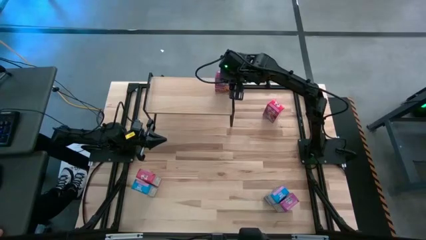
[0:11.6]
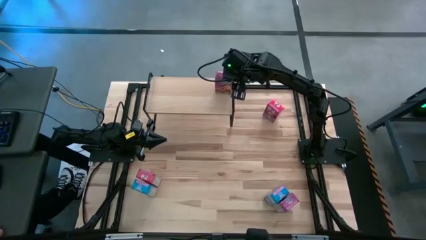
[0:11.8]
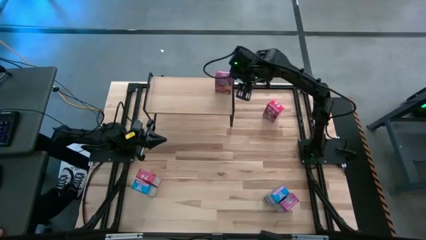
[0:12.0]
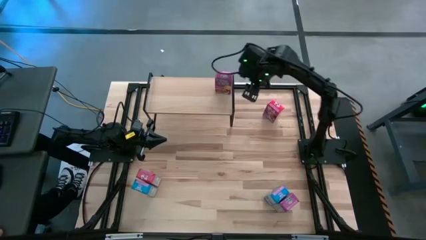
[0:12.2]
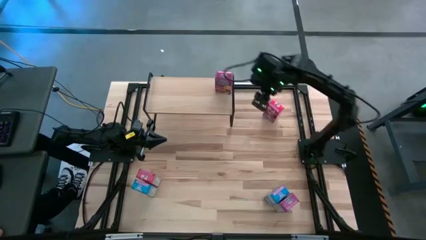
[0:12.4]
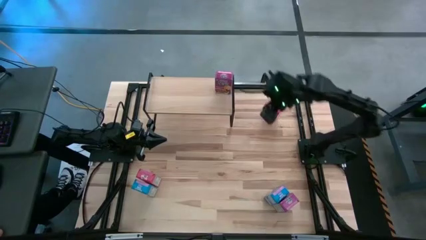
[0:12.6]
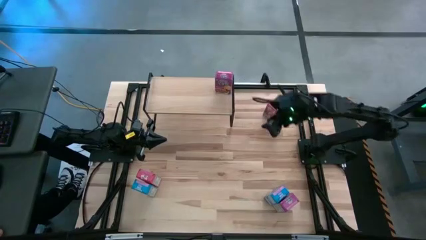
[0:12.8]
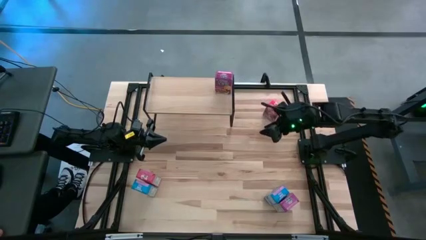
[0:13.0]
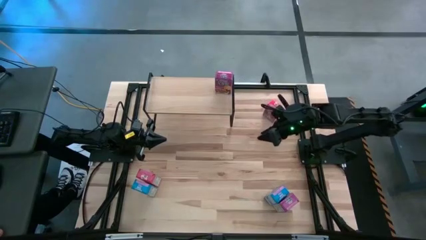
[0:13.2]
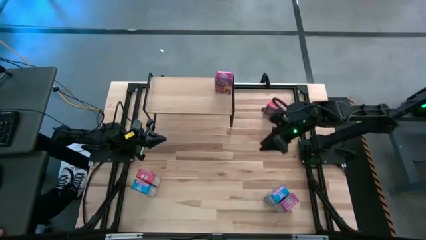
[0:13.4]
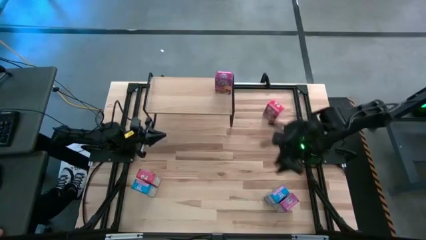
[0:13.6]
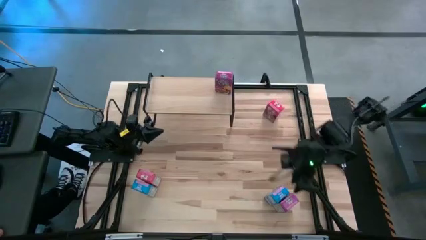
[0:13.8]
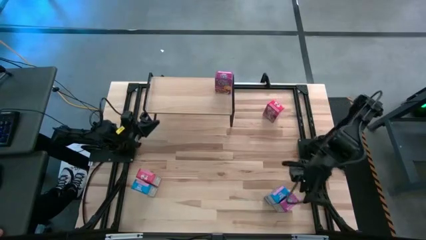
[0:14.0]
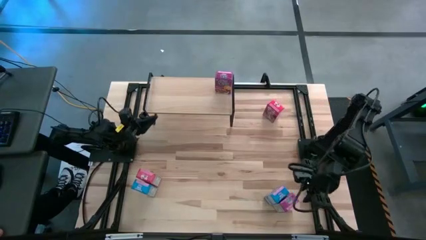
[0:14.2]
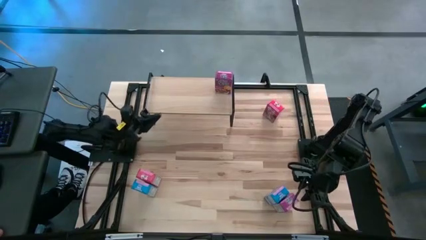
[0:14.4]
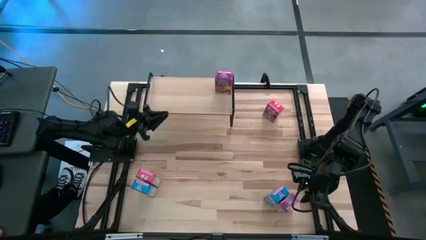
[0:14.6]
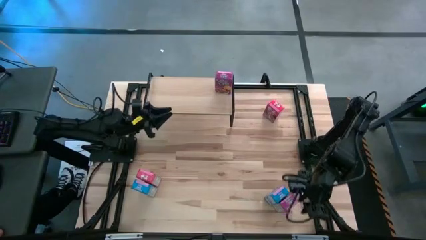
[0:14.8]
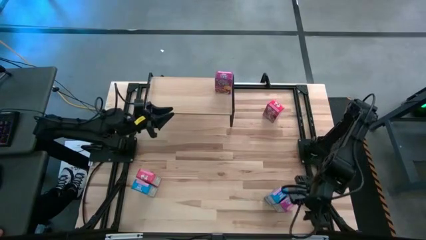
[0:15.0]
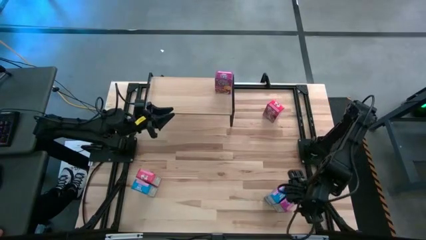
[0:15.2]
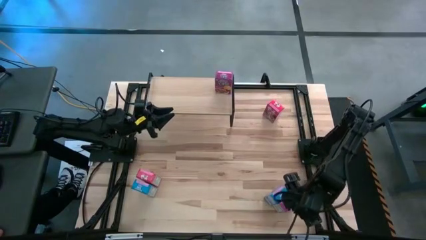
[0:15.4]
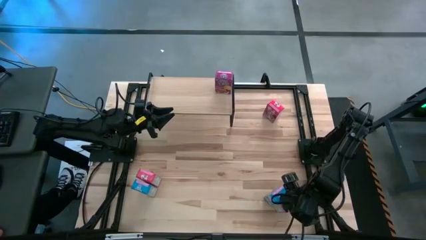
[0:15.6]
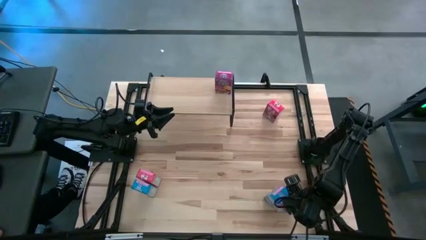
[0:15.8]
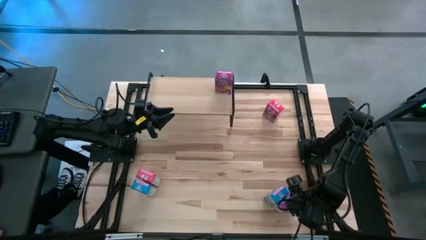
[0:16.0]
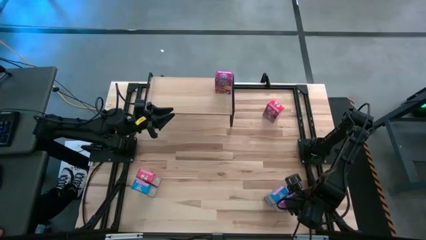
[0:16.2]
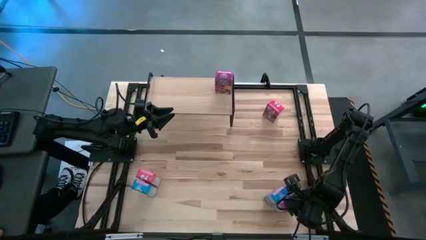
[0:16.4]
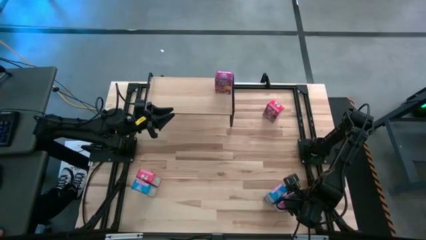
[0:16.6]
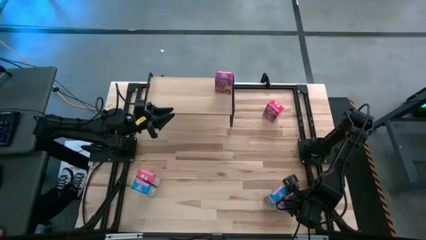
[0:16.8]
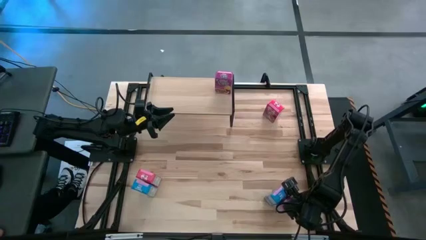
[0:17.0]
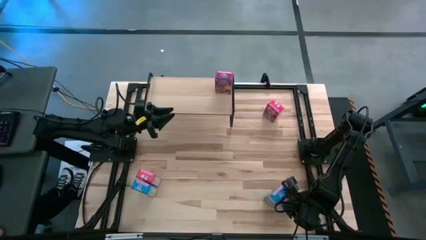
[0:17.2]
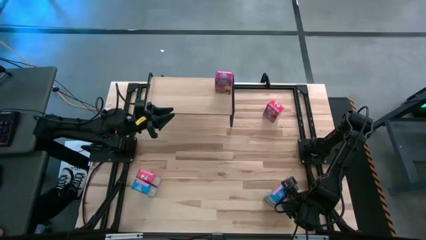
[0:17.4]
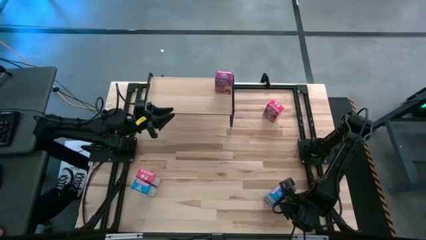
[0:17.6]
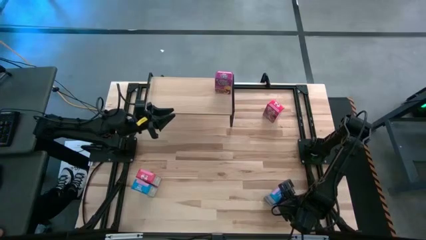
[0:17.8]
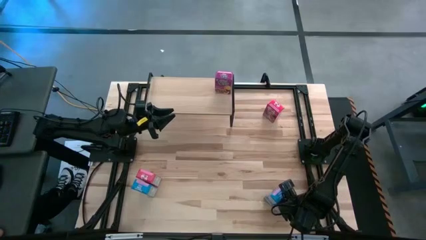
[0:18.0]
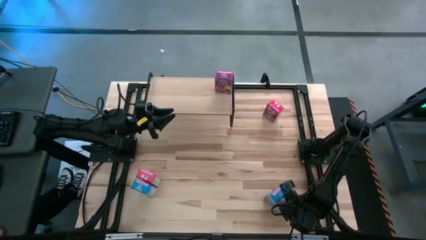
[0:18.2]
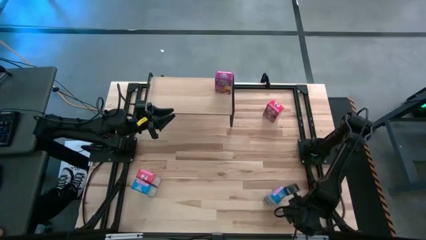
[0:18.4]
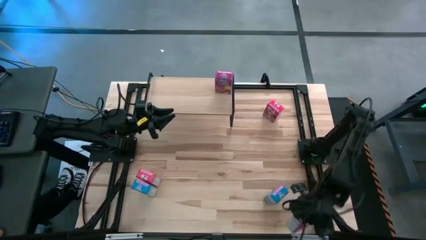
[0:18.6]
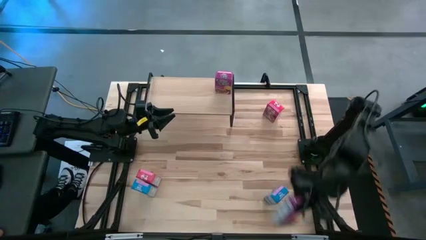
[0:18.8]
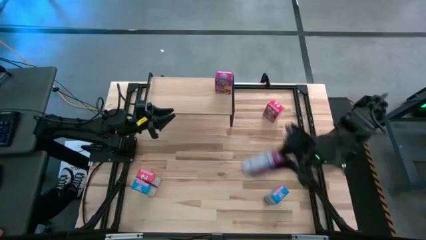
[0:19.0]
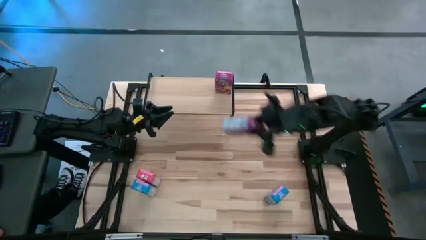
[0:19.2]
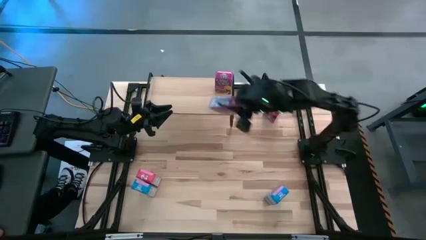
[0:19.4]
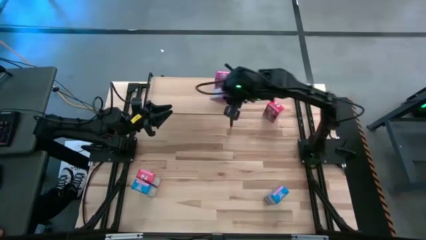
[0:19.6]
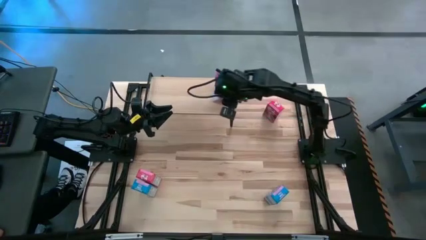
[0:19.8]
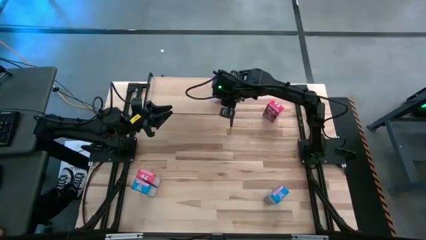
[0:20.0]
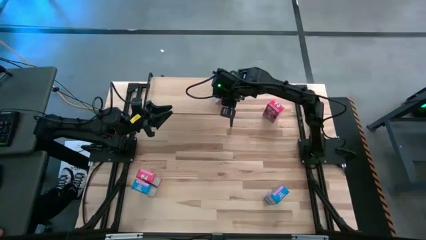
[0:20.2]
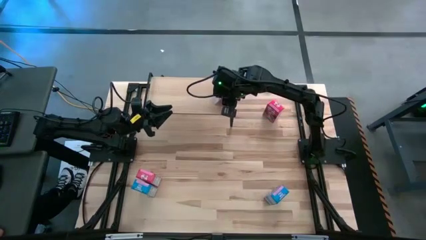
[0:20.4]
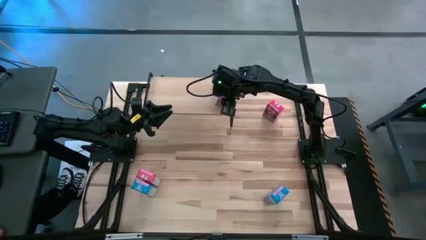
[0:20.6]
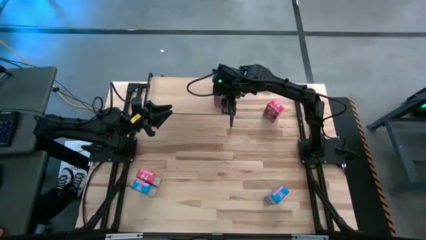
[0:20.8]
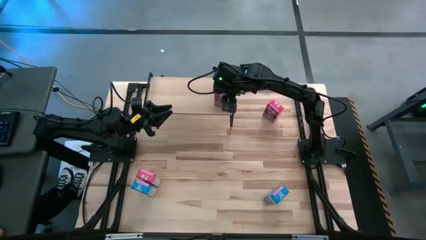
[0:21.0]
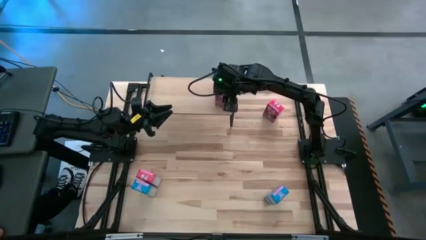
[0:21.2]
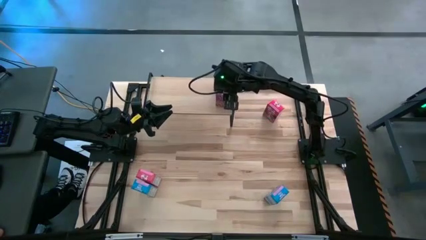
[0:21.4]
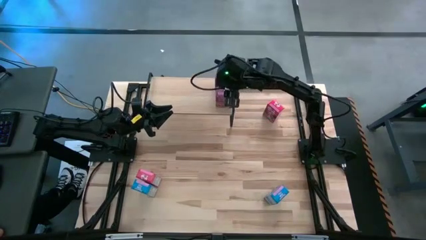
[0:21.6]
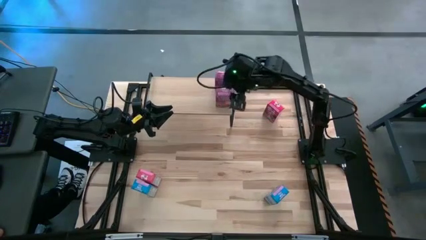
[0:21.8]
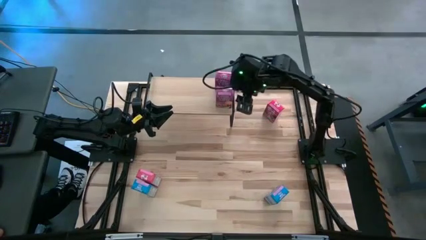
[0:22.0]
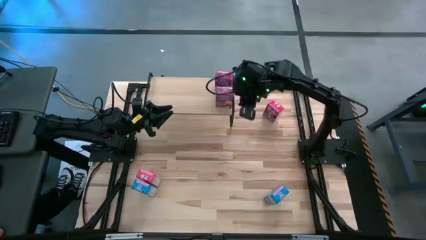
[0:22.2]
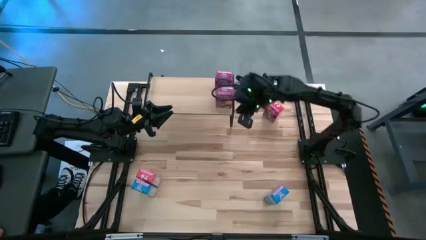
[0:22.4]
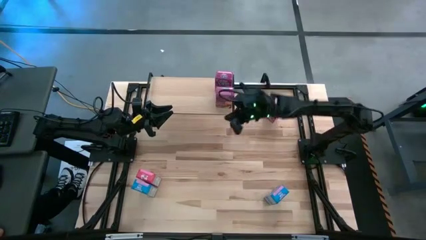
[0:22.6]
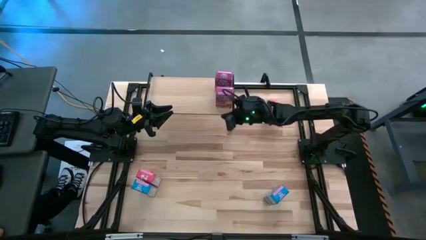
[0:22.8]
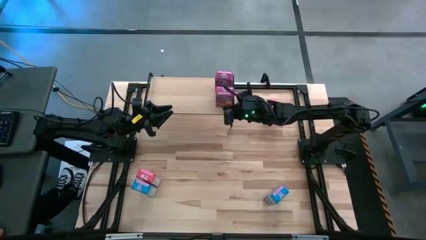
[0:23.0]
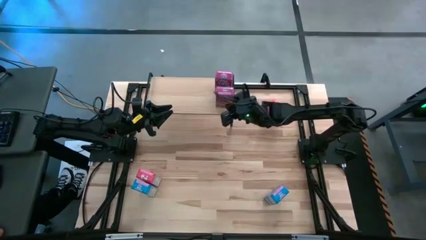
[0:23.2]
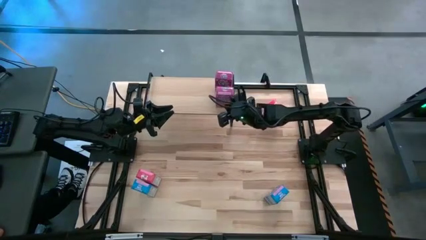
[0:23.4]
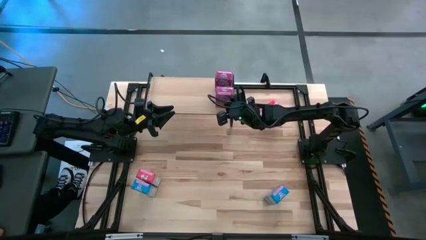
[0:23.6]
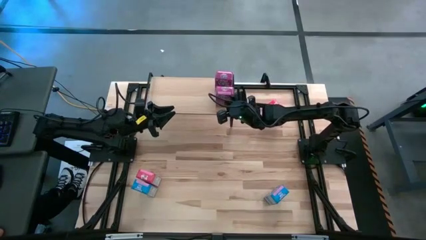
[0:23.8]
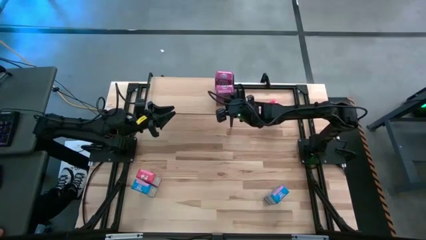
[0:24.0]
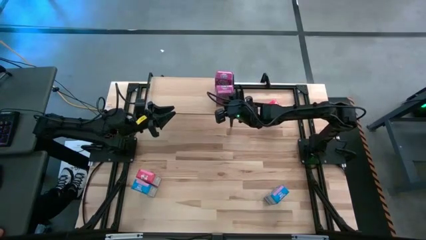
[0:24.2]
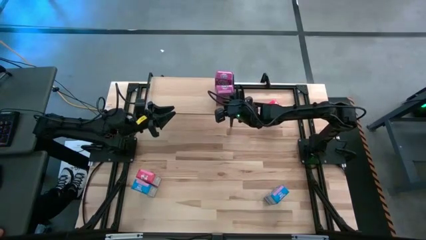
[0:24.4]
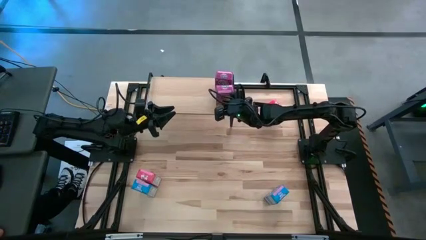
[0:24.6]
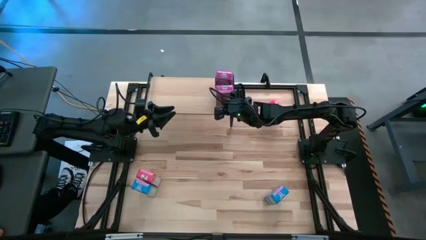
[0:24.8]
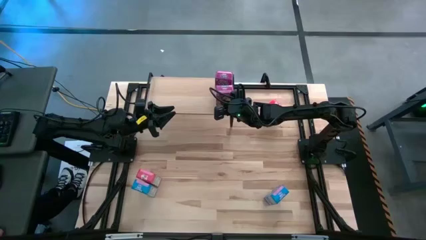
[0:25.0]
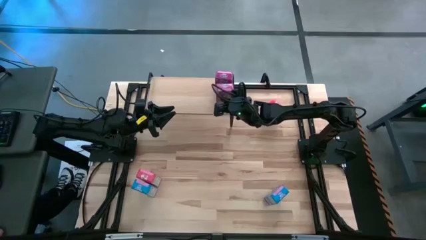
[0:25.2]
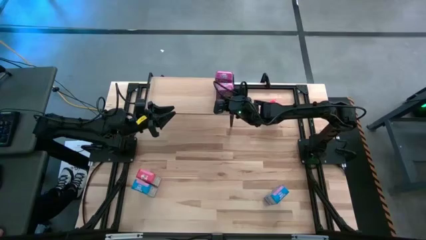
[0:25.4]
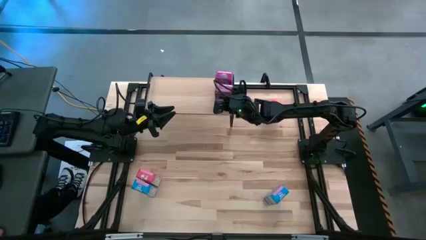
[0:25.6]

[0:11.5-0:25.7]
Task: Stack cereal on shelf
Put the purple cereal box on the shelf
